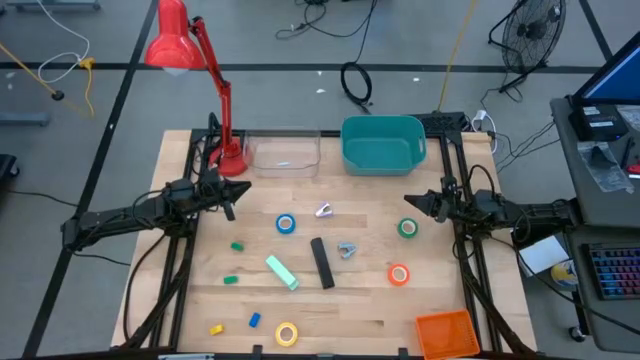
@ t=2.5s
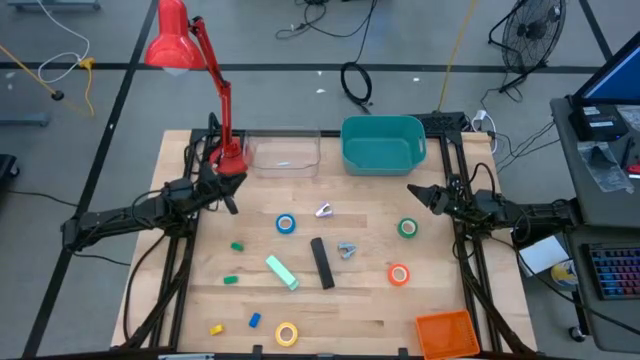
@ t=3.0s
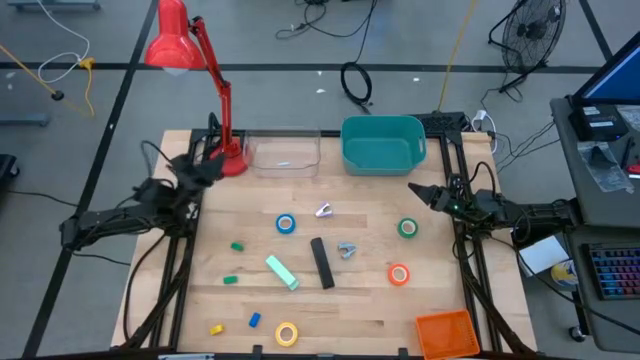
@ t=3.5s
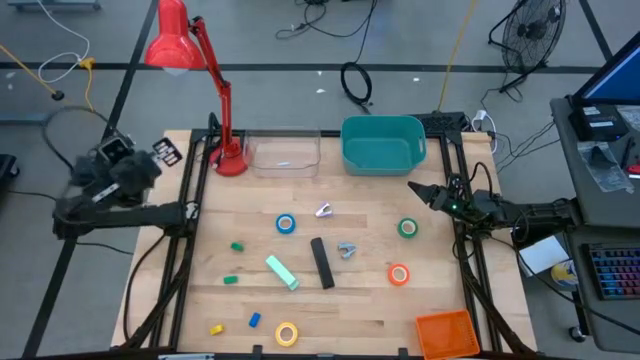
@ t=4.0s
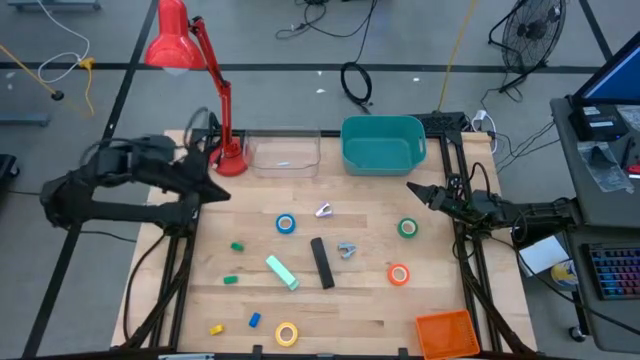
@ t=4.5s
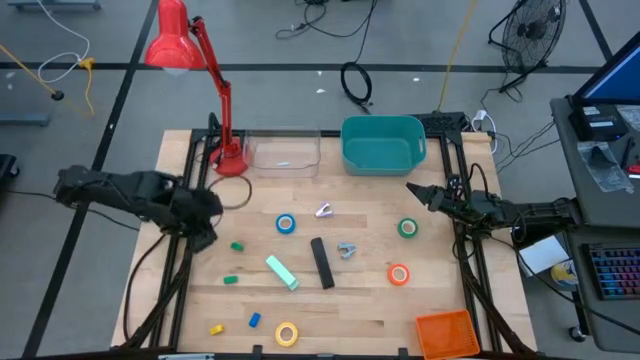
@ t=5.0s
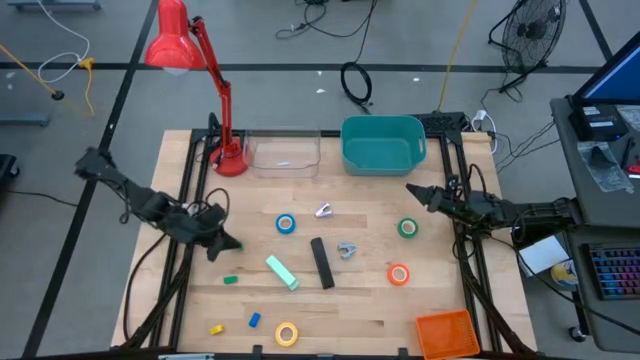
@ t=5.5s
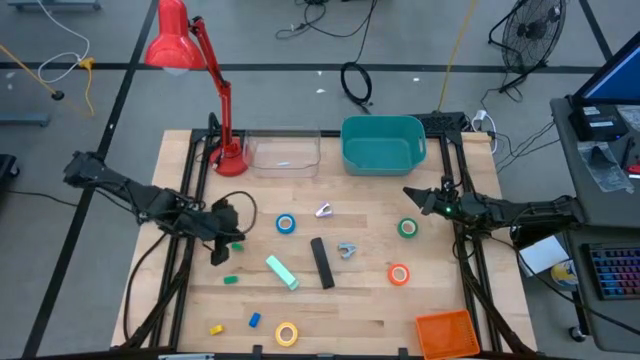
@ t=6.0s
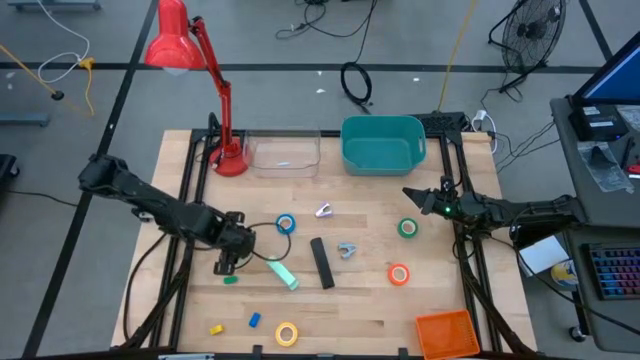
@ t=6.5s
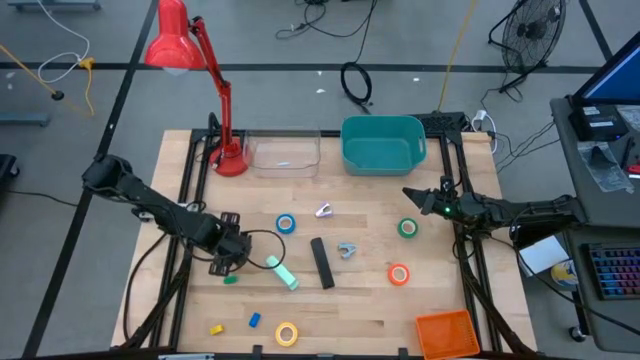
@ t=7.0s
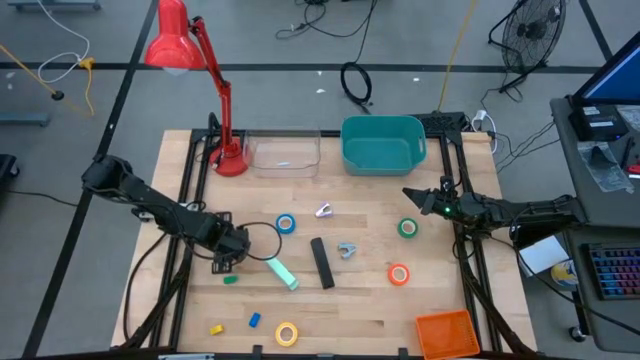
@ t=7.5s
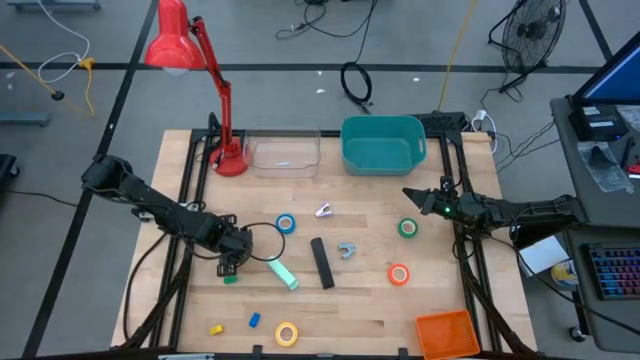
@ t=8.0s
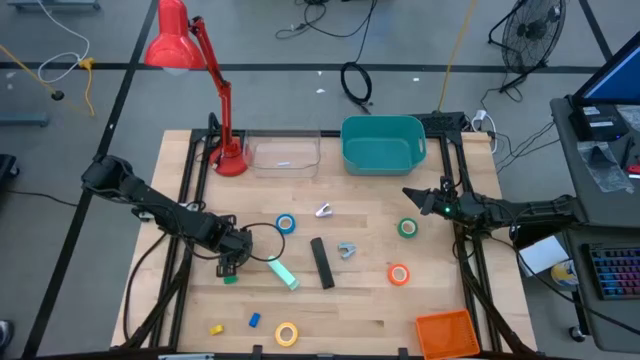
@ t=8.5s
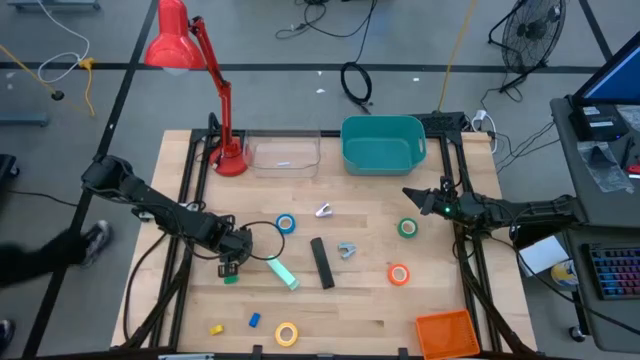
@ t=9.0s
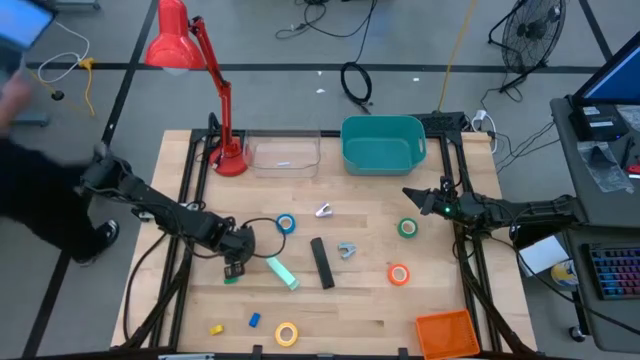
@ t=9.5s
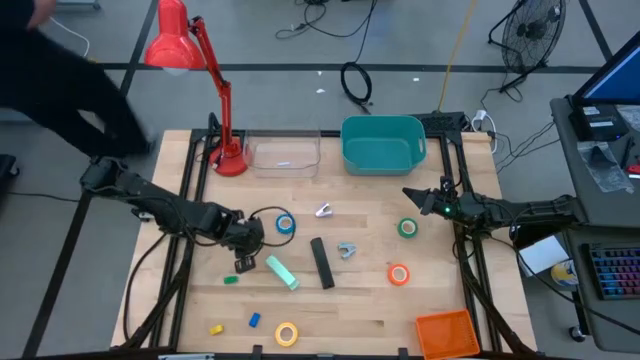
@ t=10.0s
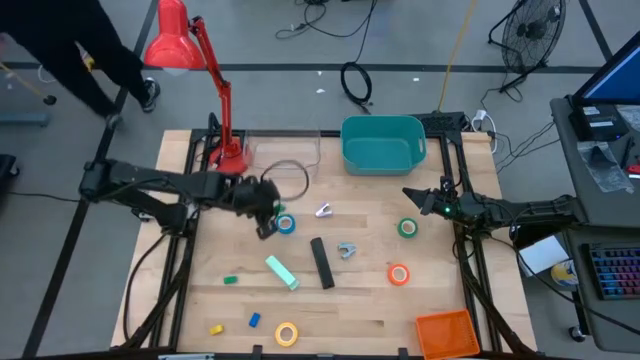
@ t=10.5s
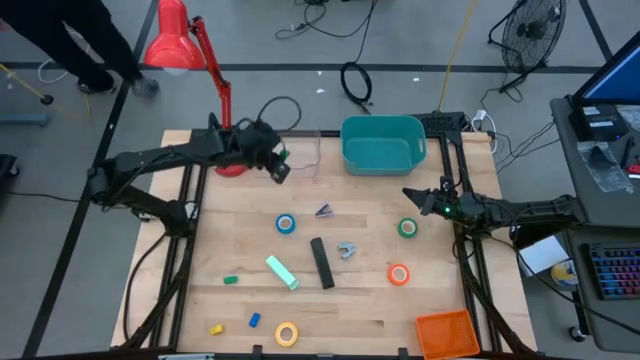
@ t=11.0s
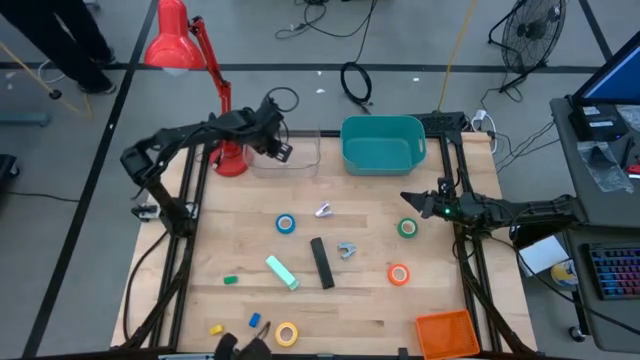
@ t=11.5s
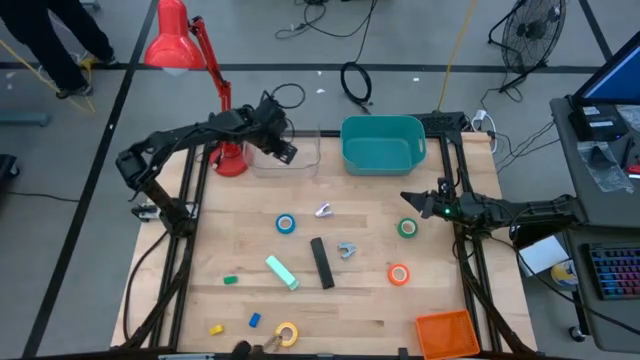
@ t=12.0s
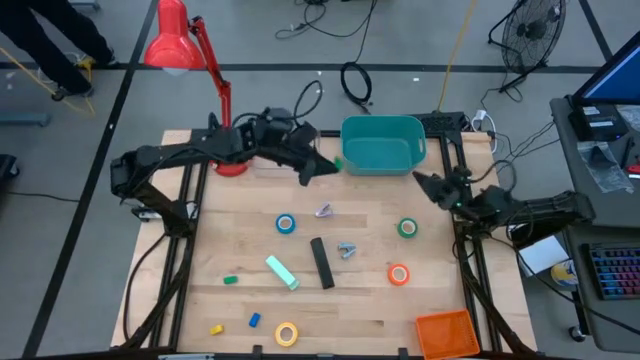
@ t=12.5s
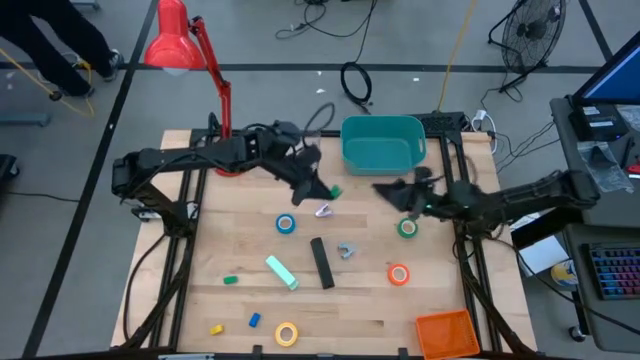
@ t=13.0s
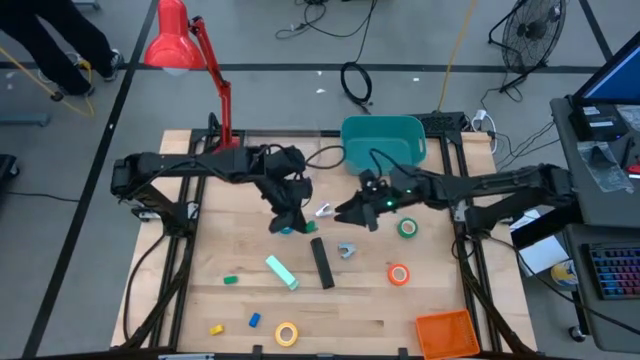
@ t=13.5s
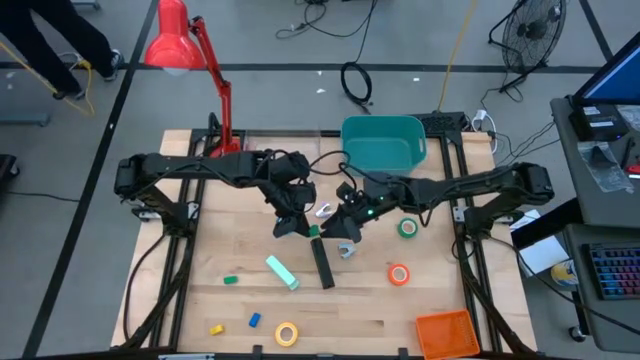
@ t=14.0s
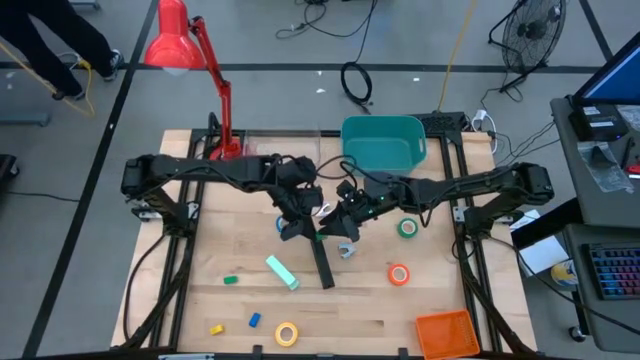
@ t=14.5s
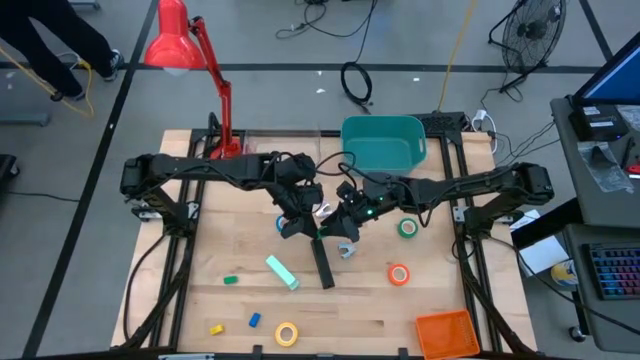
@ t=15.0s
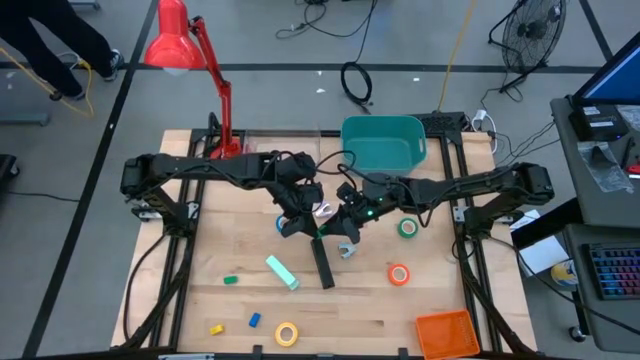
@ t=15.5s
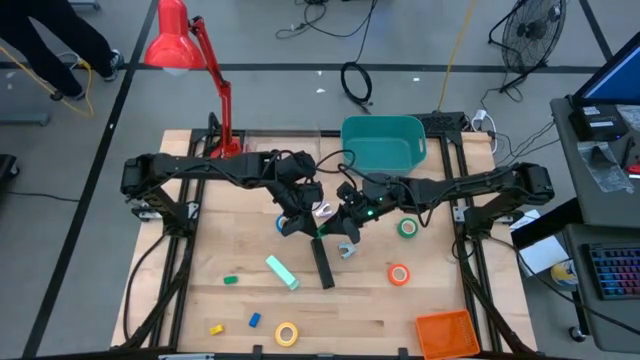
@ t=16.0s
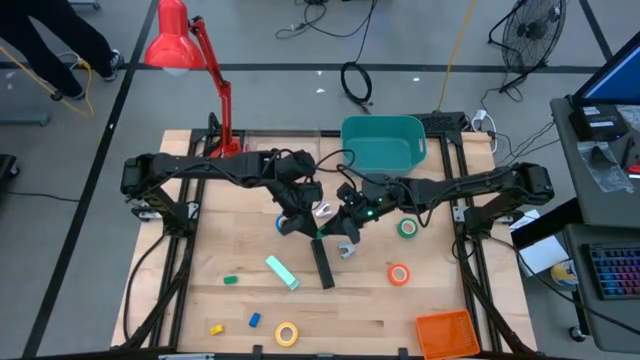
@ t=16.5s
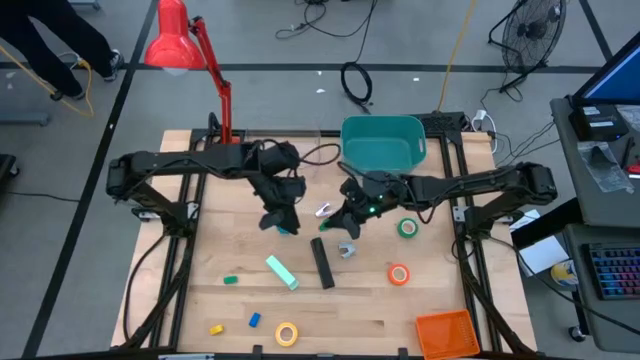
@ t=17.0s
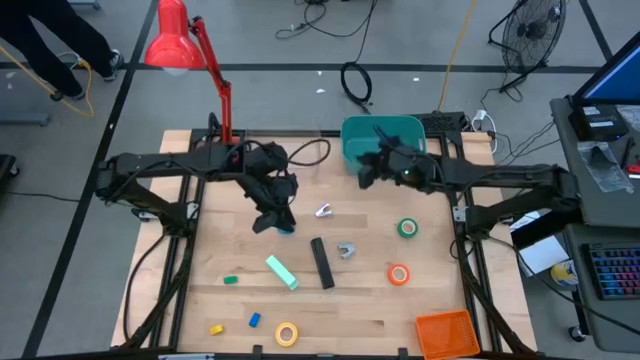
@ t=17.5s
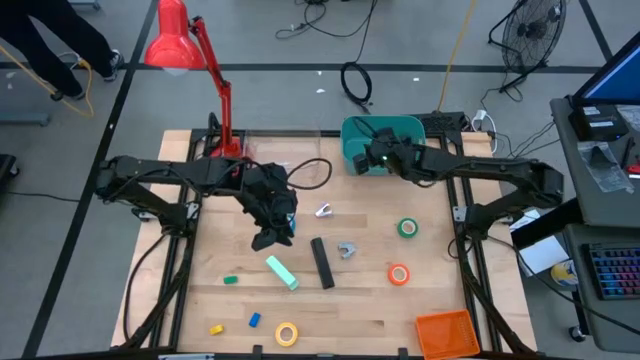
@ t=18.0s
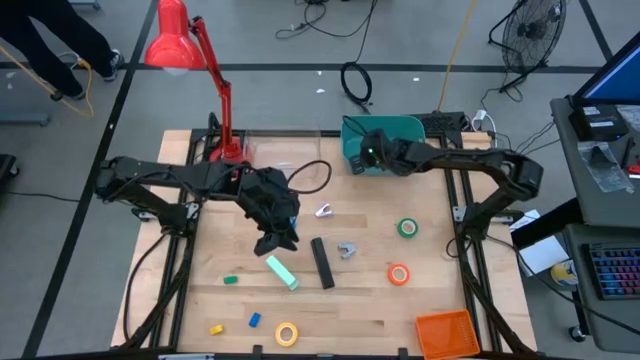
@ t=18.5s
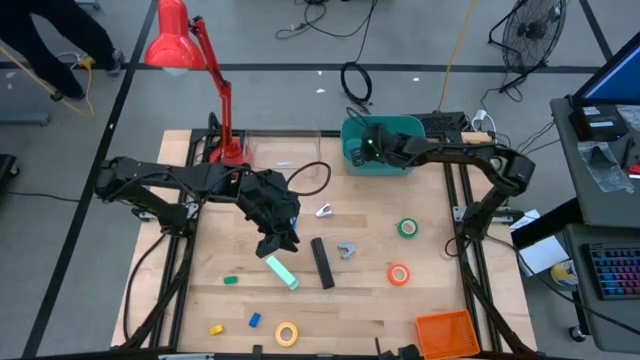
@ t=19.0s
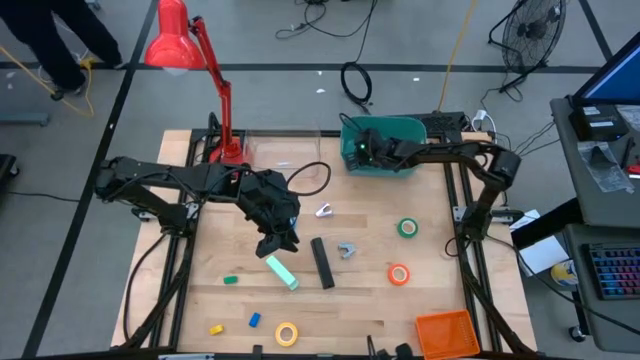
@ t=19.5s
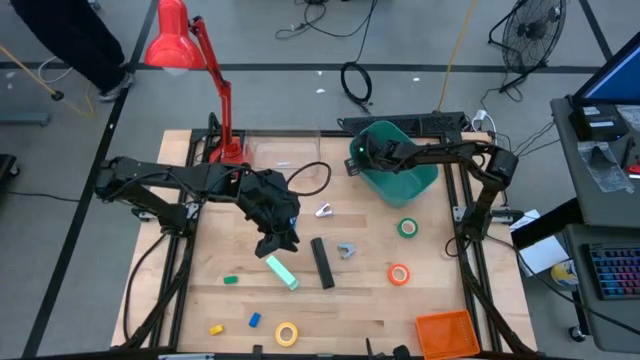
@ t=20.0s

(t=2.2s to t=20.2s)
Task: Pick and place Stapler, Stapler remover, tape
Put the top green stapler into the green bin

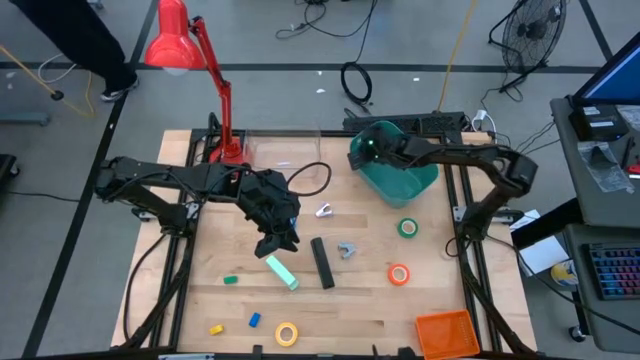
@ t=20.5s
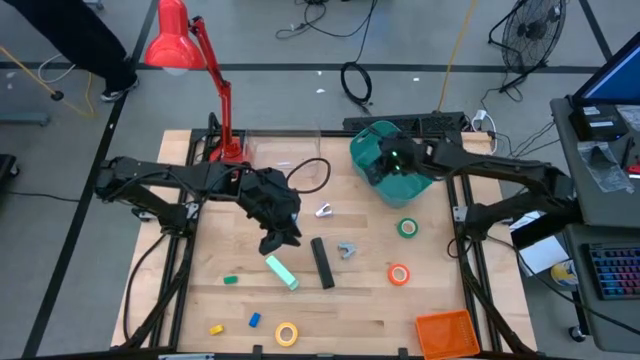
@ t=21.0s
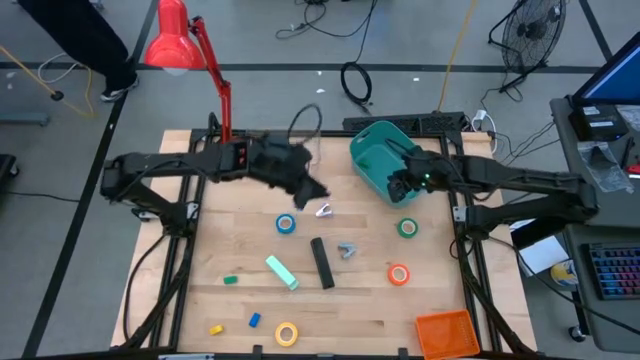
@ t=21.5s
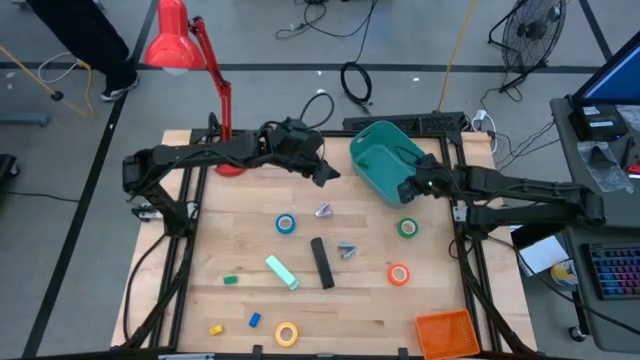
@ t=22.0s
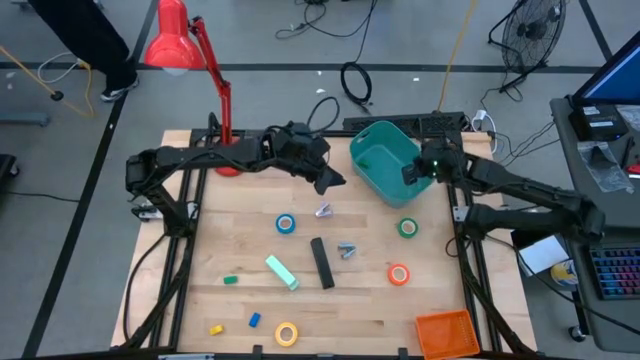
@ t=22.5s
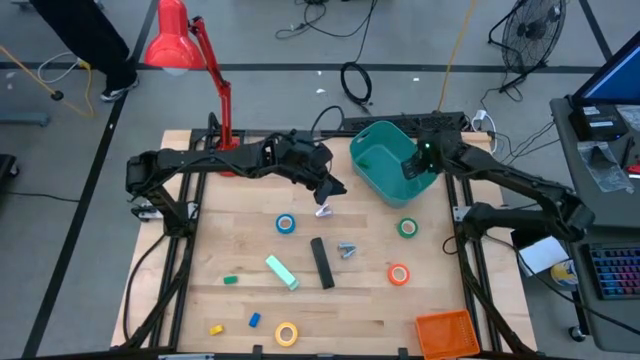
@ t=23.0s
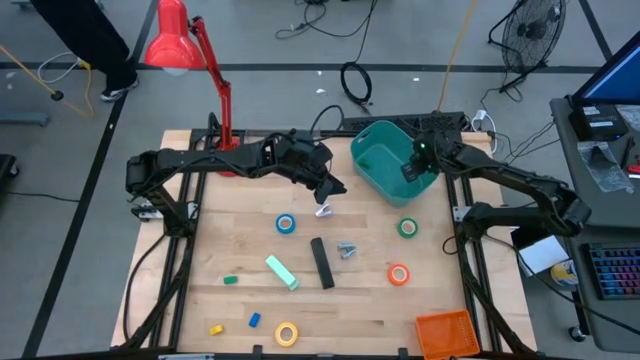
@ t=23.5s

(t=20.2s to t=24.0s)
Adjust the green bin
